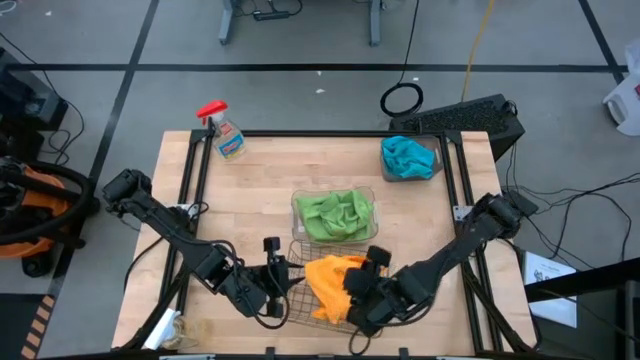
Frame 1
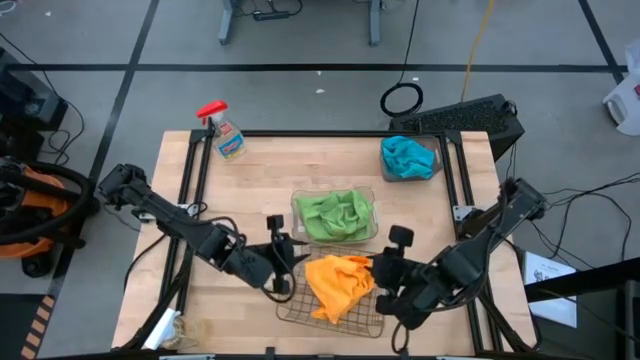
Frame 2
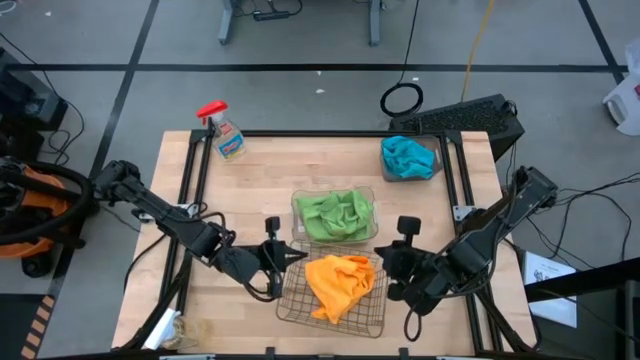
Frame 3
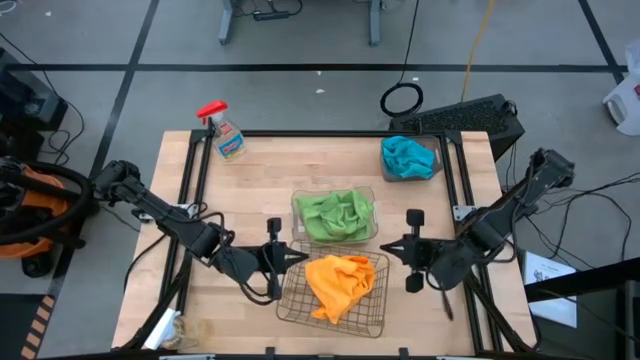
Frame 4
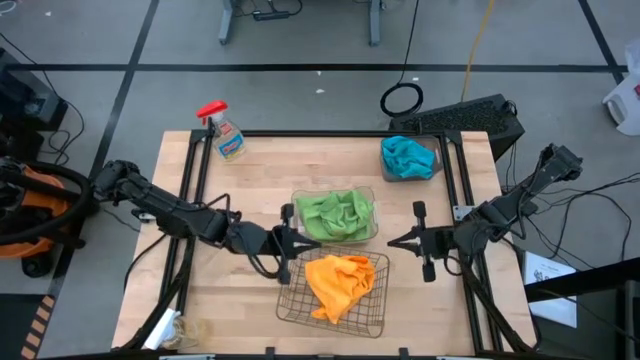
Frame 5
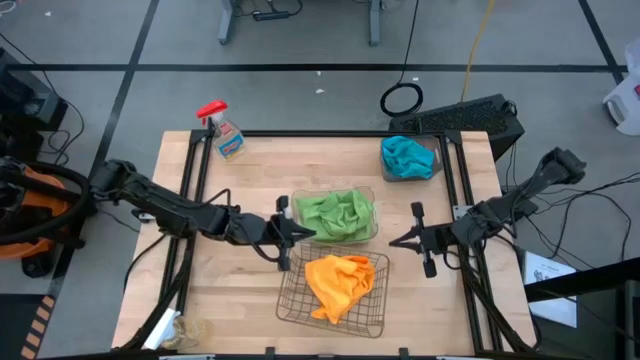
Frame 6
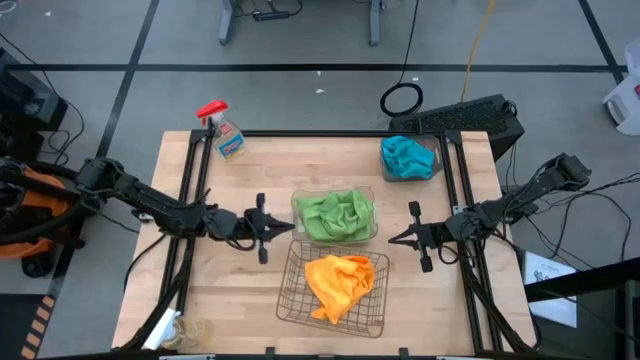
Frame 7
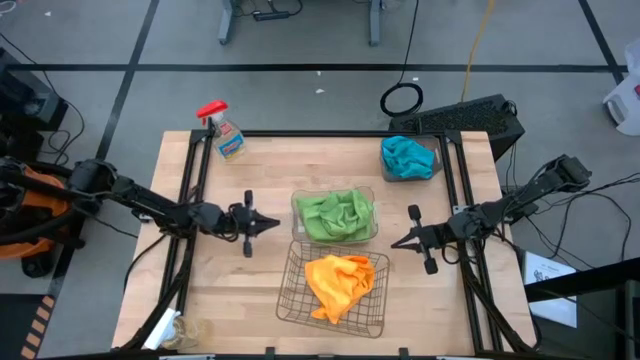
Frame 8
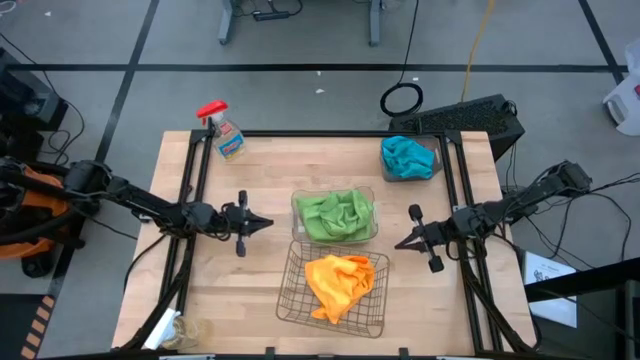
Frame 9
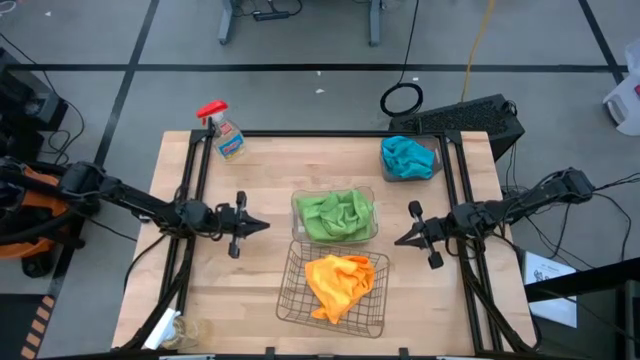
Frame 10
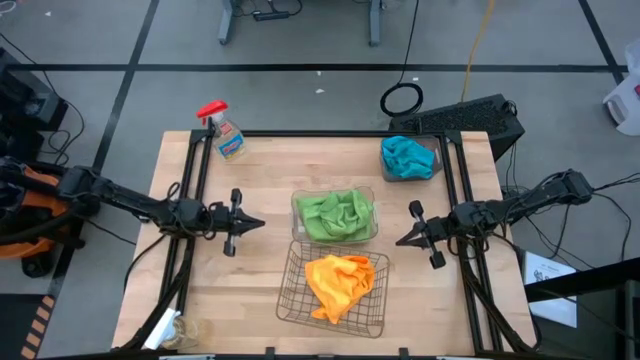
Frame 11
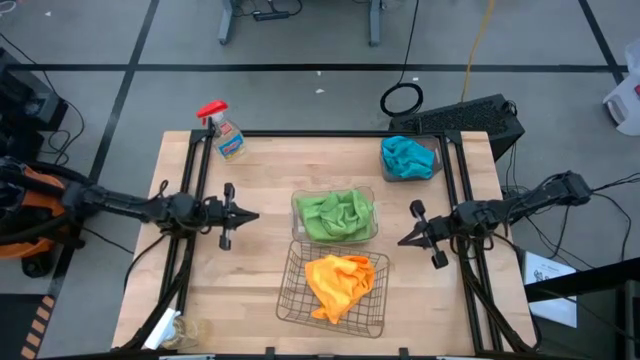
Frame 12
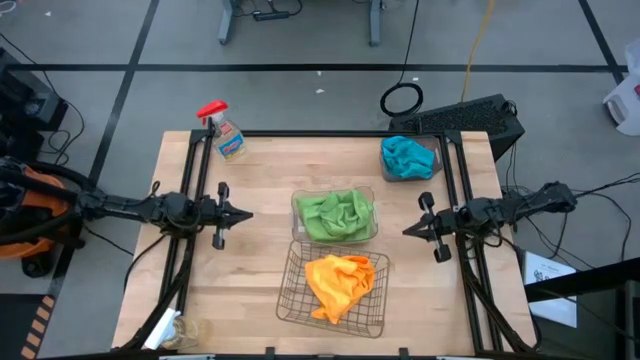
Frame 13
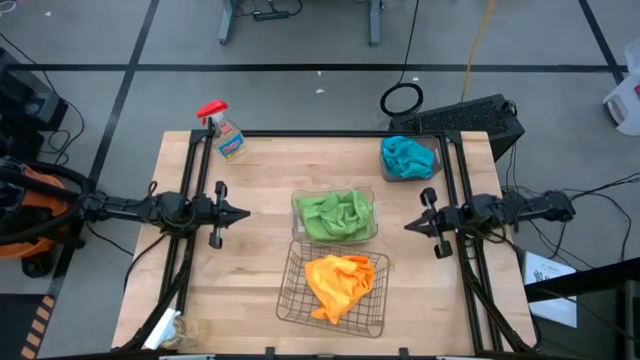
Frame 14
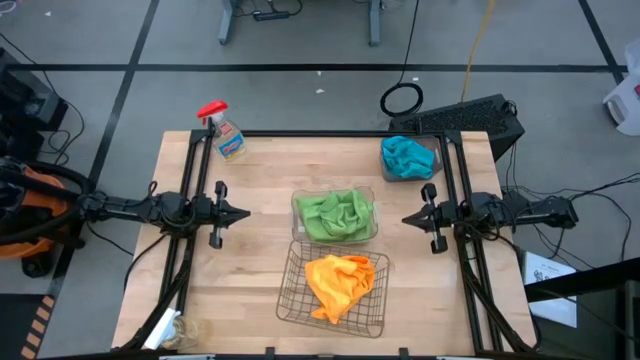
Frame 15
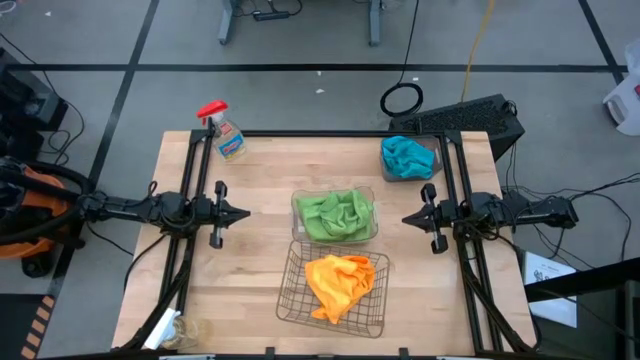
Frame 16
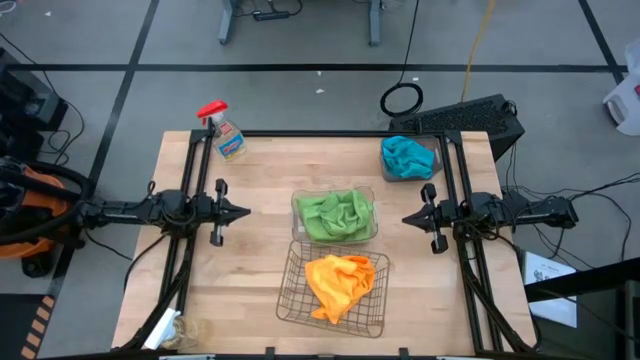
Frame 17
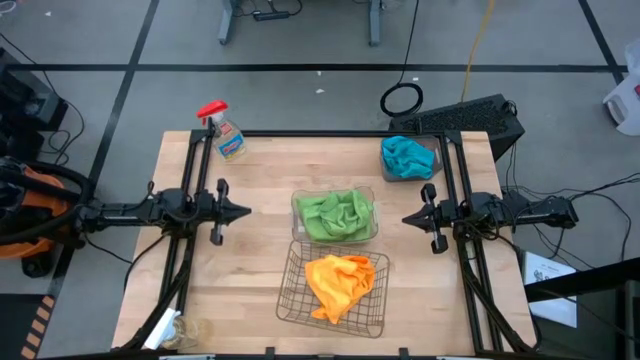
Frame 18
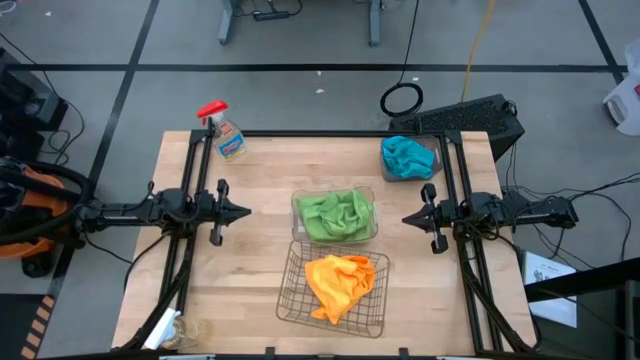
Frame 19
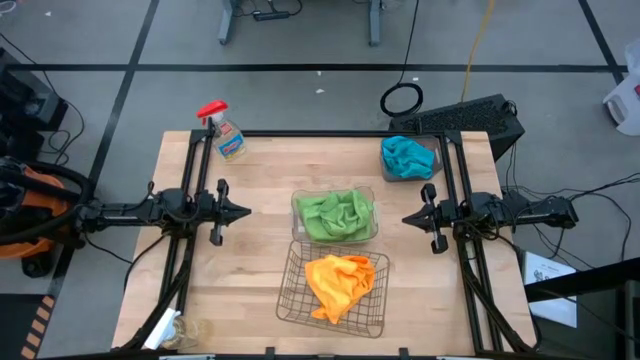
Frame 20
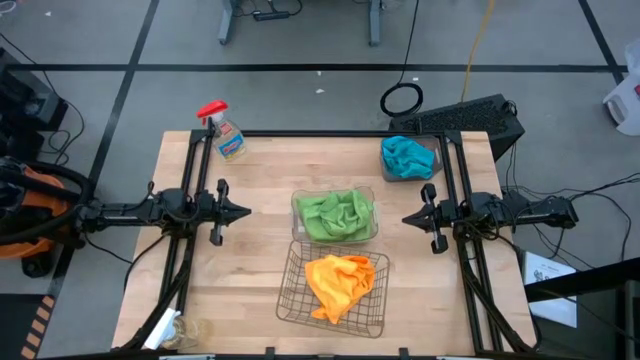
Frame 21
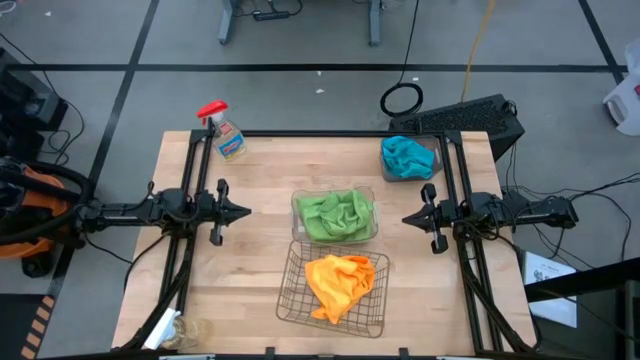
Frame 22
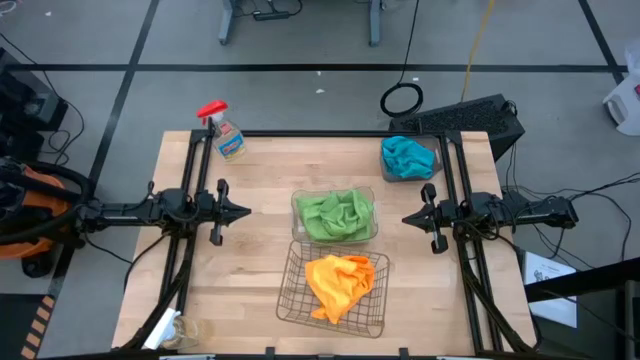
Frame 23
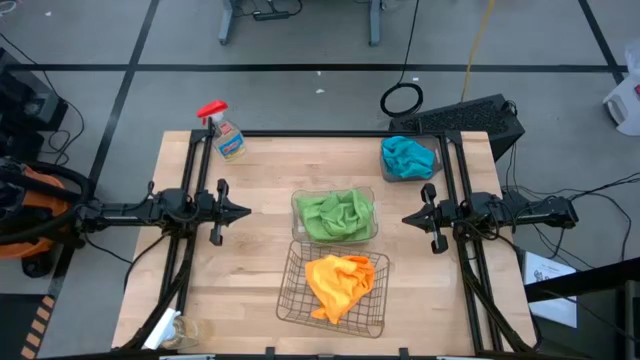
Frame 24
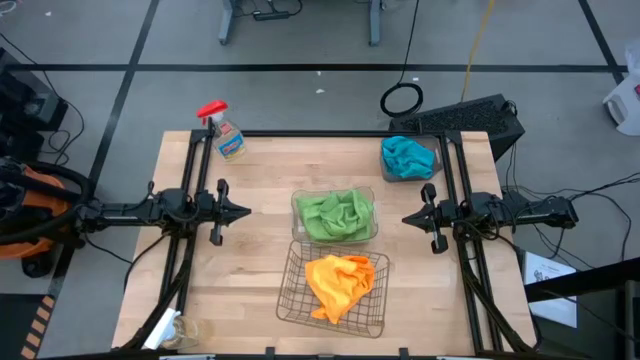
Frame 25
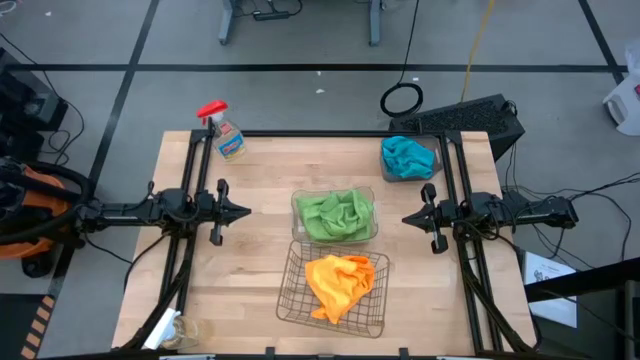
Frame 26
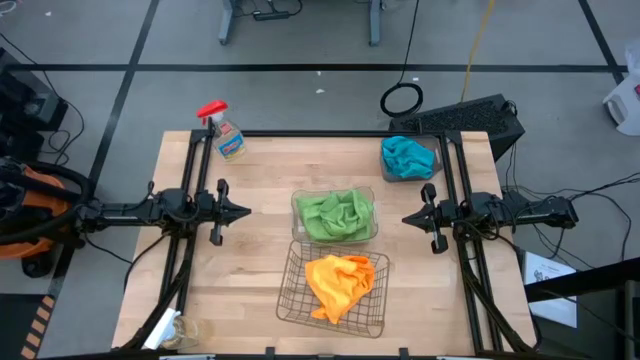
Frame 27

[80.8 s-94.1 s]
Task: Sort microfiber towel by color & place in baskets
Return to Home Position

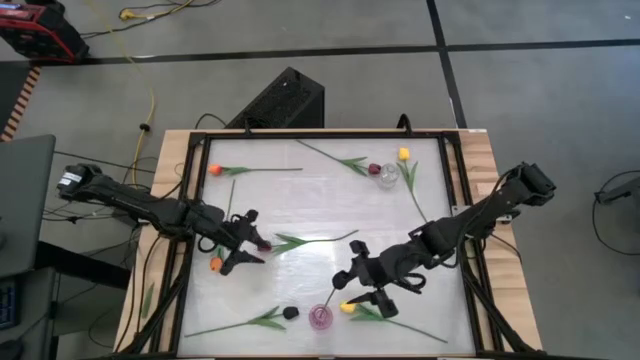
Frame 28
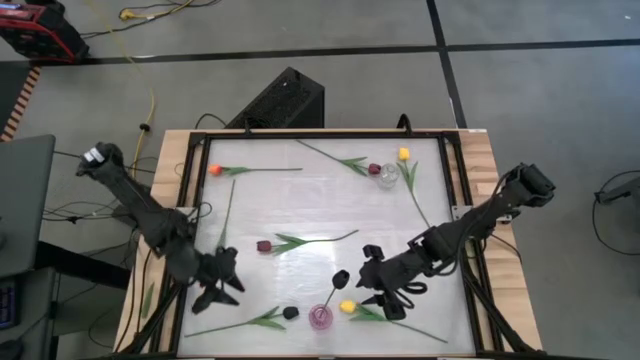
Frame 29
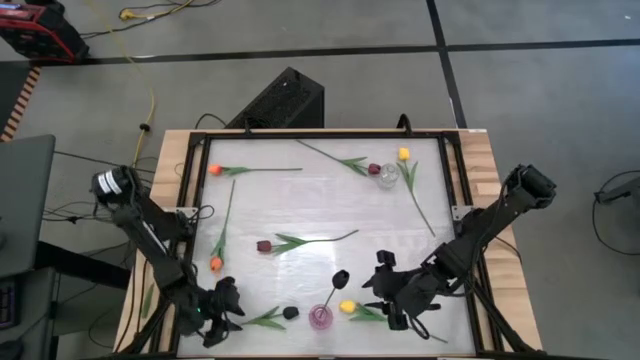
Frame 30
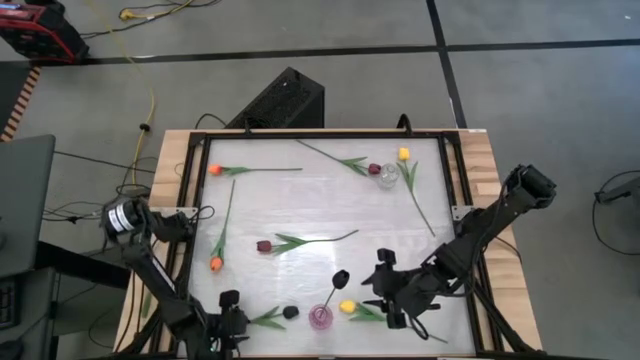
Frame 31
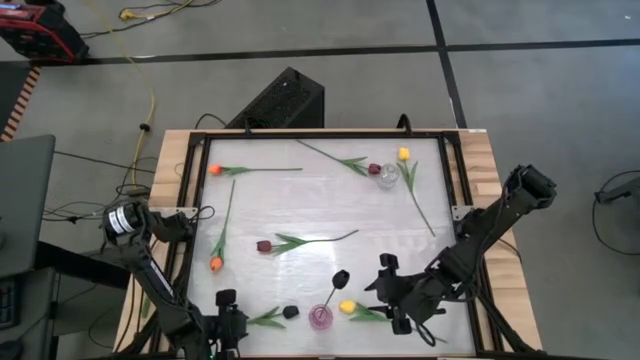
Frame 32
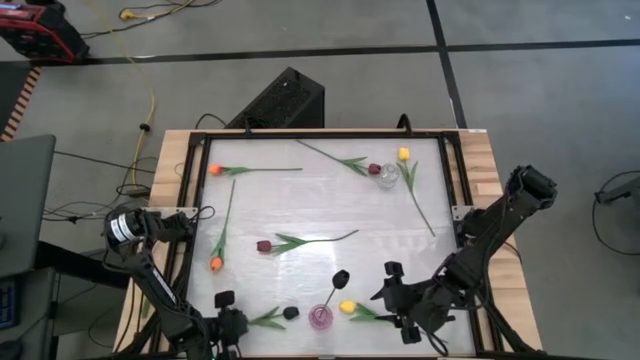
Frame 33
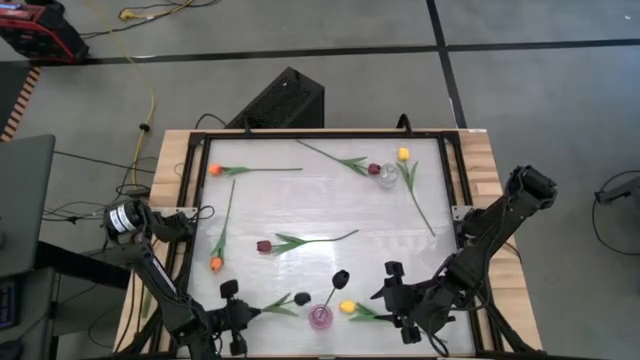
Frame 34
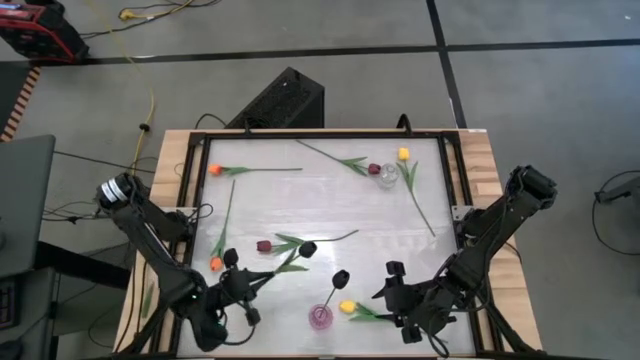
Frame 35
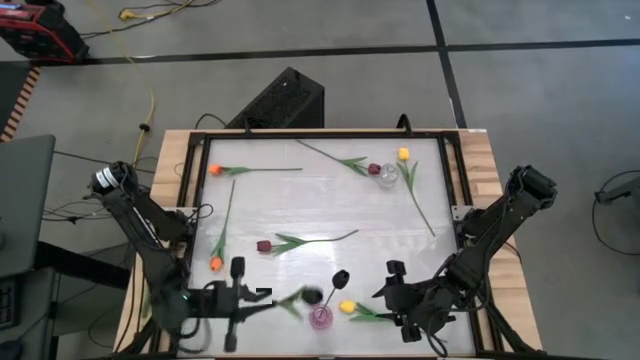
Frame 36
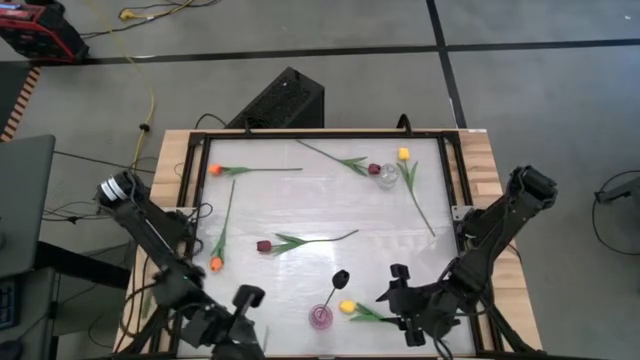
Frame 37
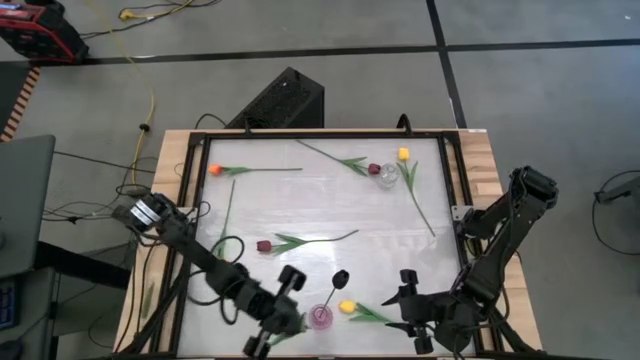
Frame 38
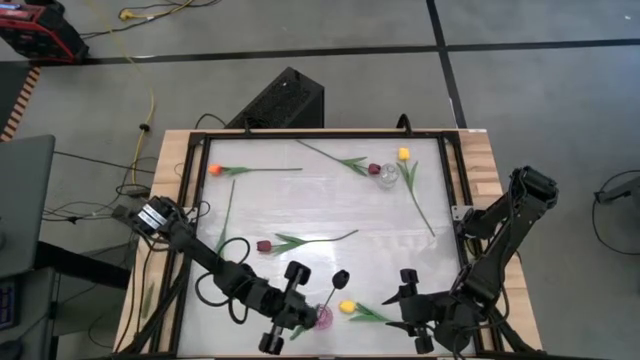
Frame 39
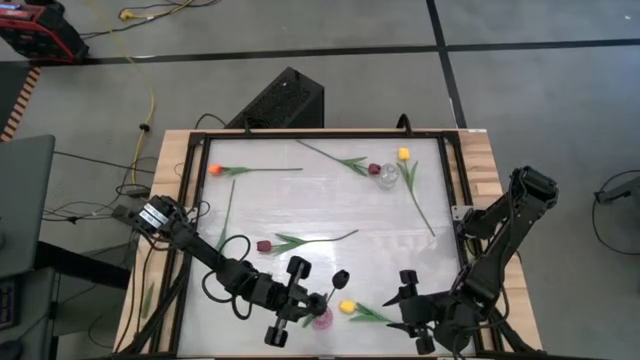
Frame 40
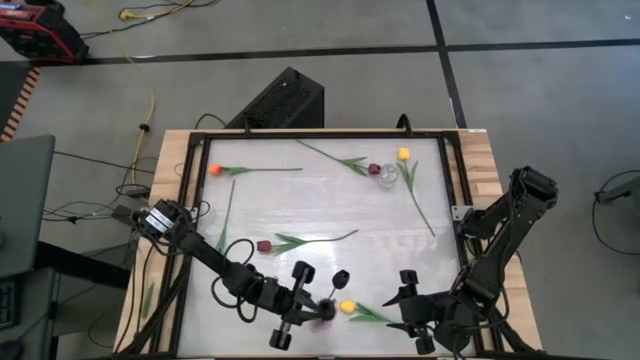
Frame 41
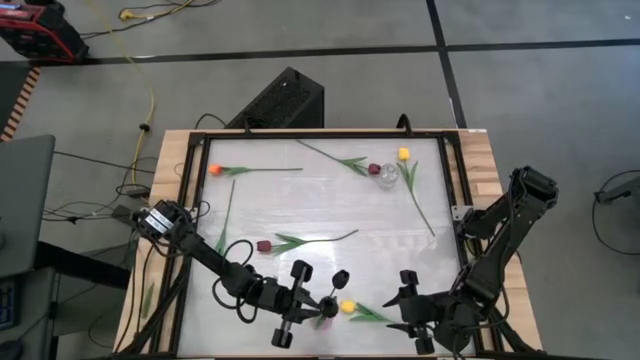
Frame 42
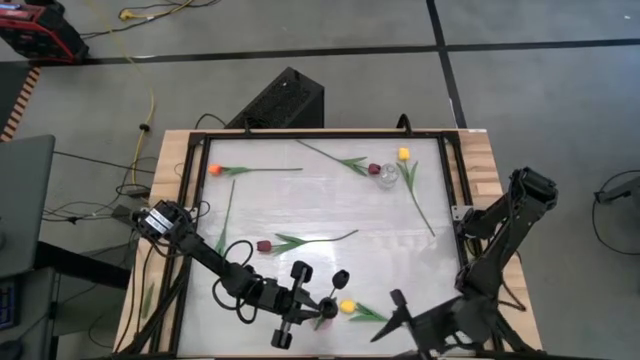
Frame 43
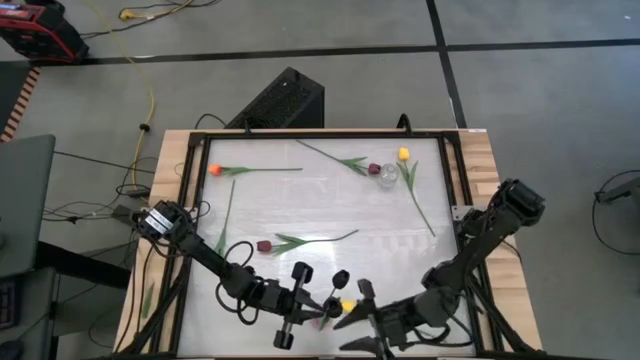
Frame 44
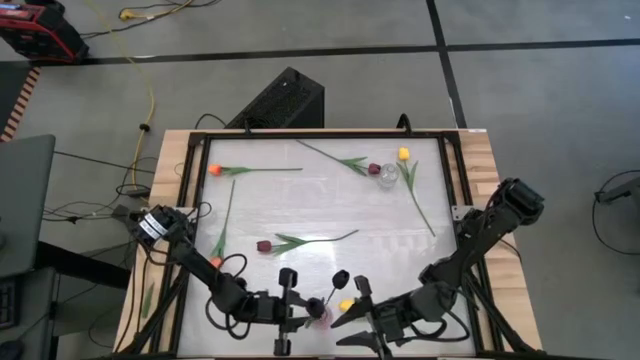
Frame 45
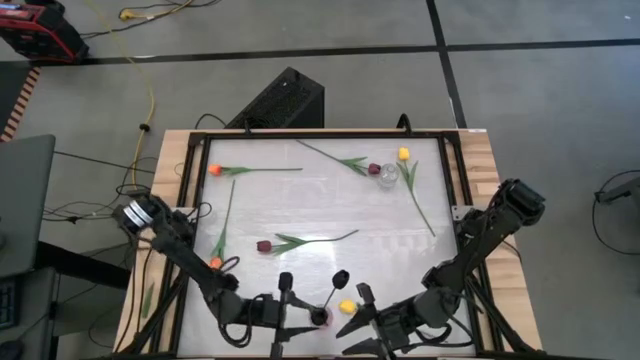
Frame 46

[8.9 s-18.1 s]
Task: Sort flowers into vase by color
Put the black tulip into the pink vase
